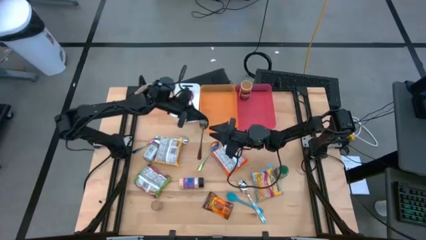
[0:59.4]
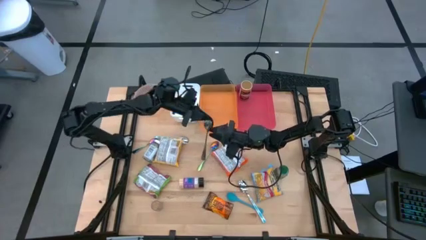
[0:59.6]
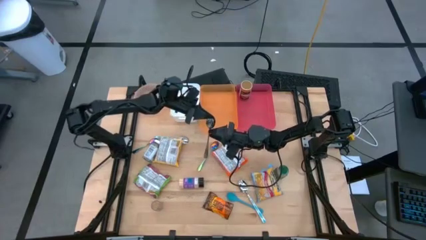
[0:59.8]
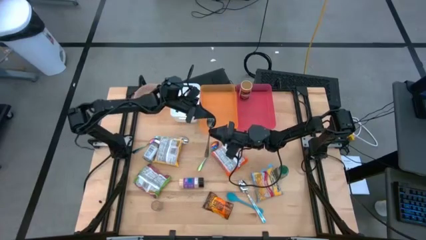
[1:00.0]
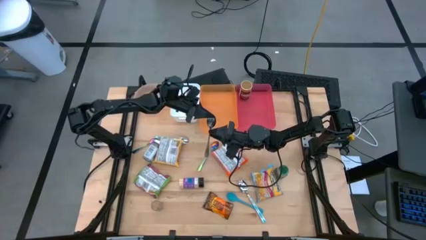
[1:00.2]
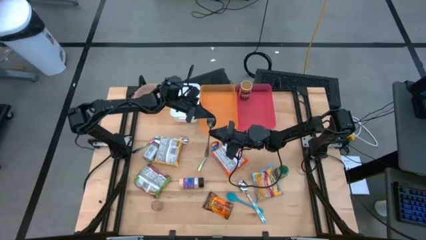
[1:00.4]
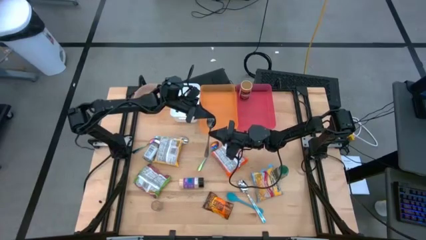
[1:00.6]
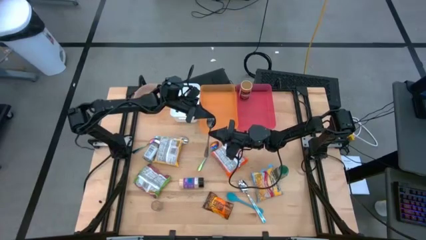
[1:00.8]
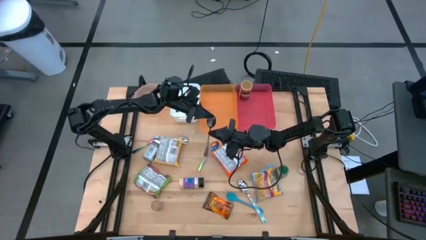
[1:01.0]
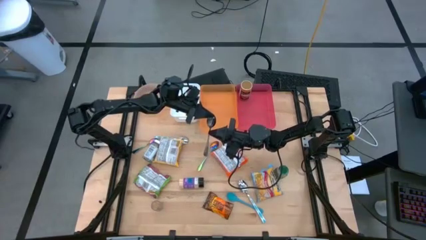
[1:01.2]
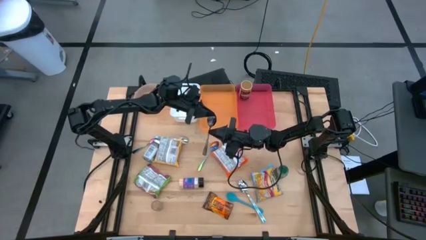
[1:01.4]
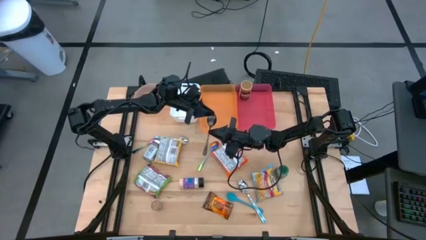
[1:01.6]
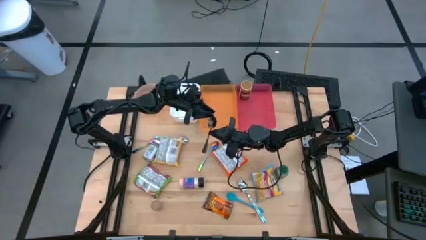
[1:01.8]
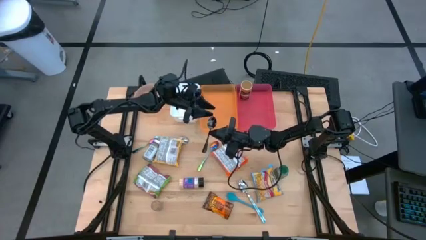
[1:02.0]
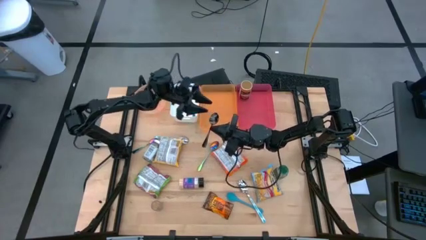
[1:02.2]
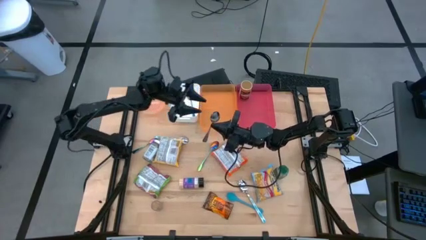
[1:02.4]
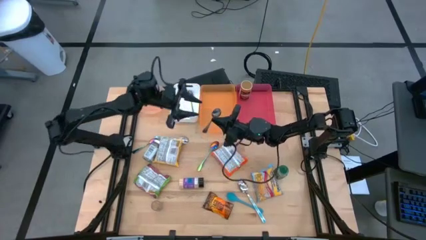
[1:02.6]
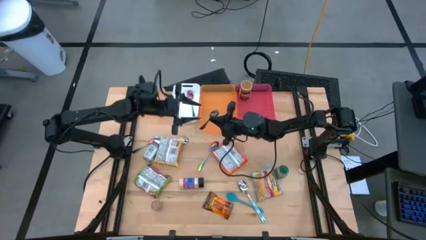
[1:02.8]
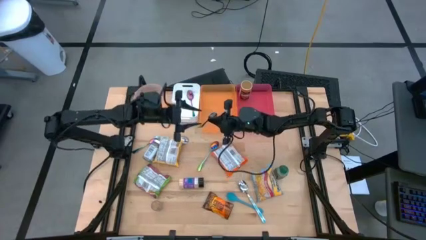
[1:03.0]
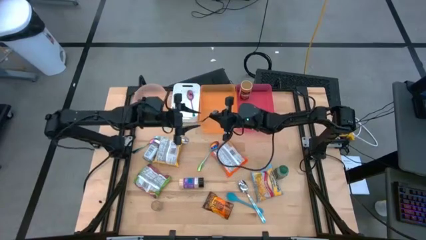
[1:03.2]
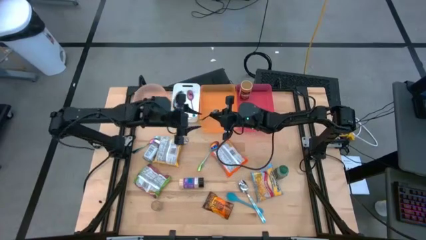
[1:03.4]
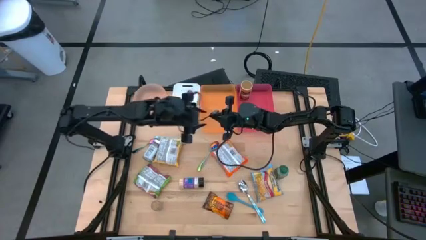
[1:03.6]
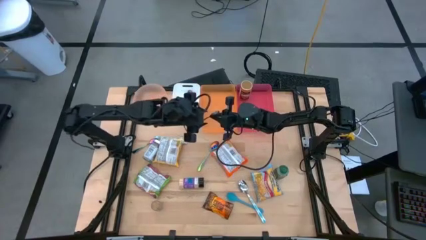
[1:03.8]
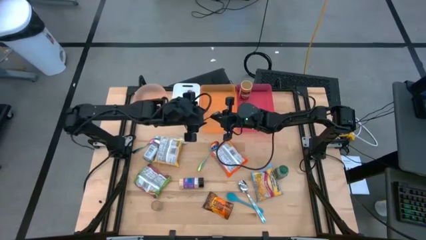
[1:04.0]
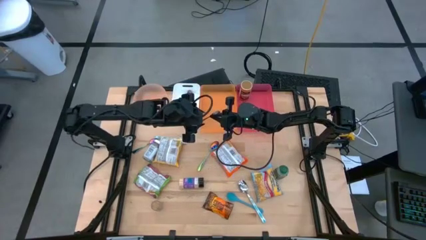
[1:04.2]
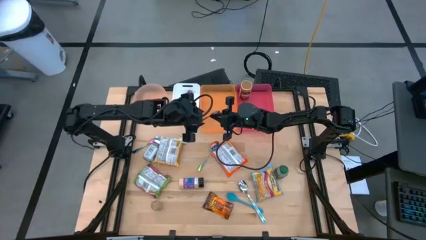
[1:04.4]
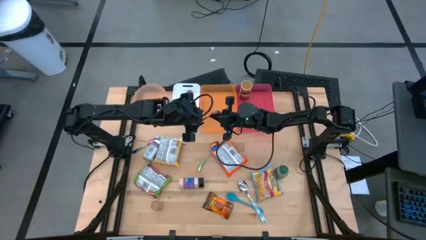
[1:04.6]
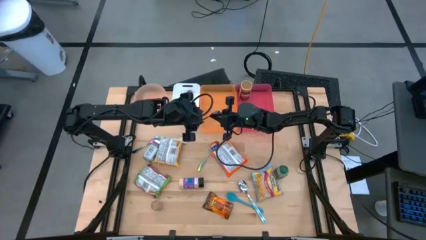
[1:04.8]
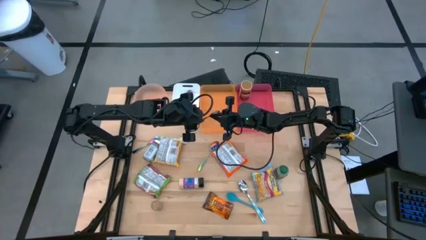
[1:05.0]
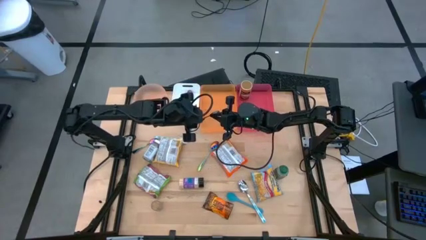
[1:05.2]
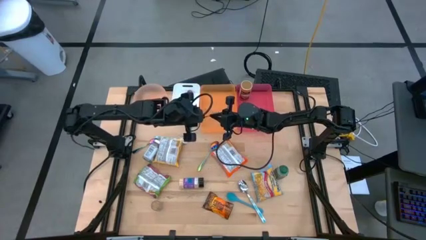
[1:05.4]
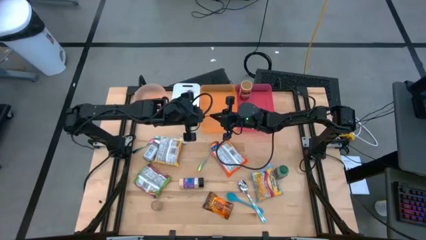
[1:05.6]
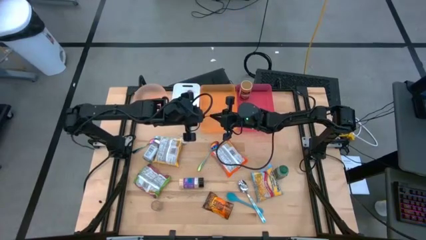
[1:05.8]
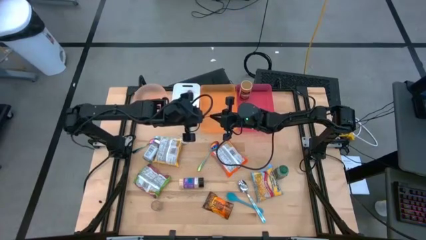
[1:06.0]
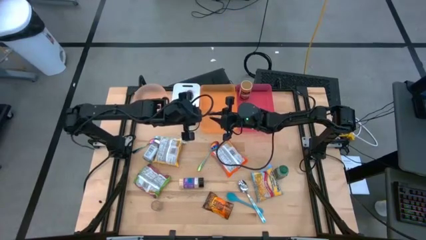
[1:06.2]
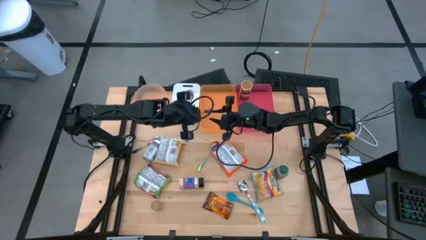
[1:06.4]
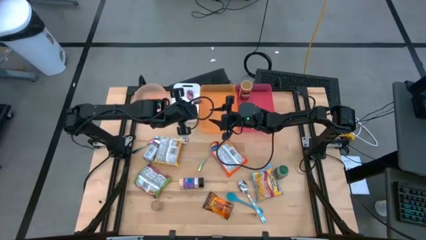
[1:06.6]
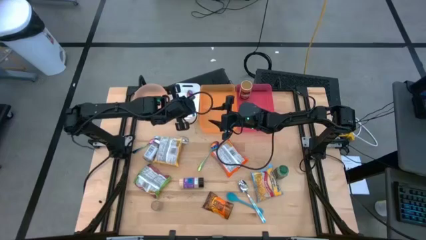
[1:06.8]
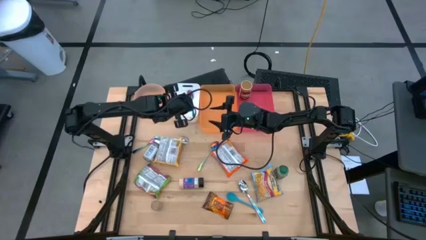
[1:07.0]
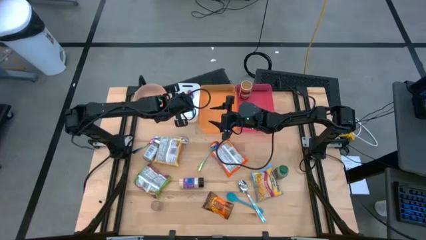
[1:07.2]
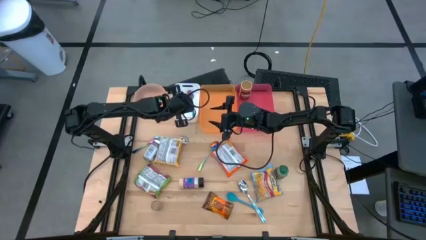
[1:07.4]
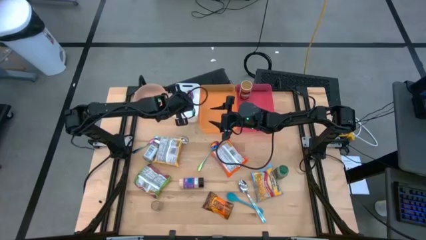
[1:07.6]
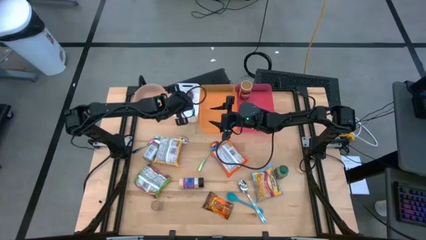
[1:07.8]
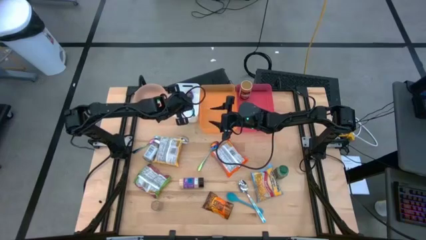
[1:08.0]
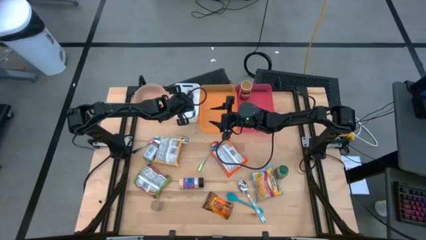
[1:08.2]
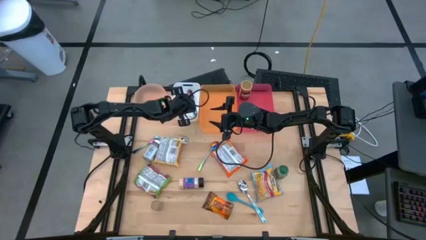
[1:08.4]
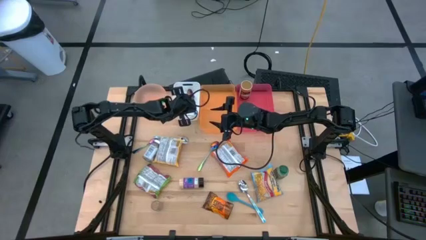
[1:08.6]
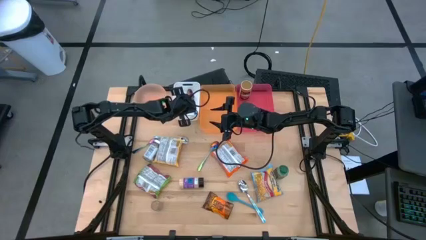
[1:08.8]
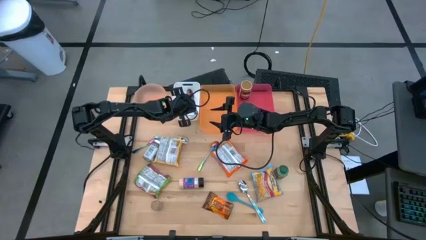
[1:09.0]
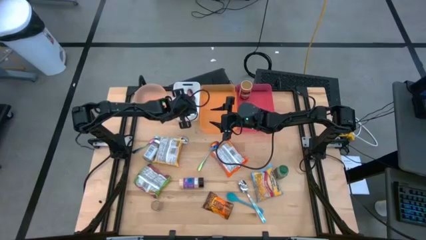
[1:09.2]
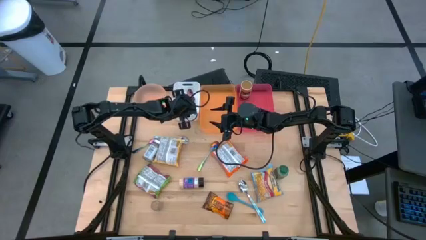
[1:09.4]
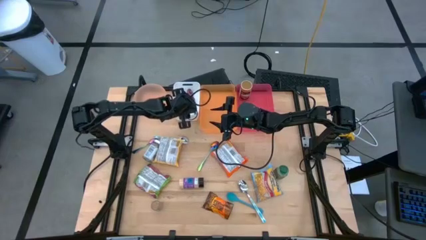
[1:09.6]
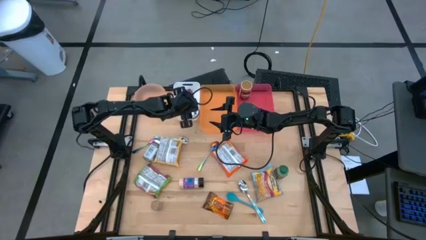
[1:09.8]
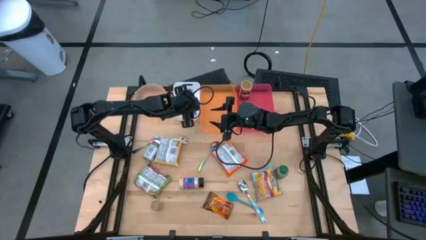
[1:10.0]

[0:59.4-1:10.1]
Task: Pick & Place Food Item
Put the black spoon into the white bin

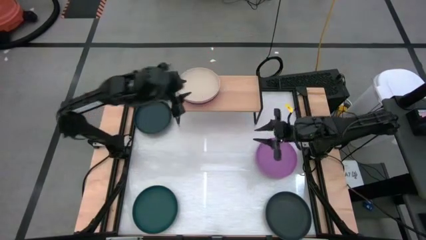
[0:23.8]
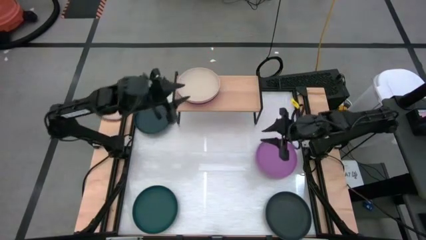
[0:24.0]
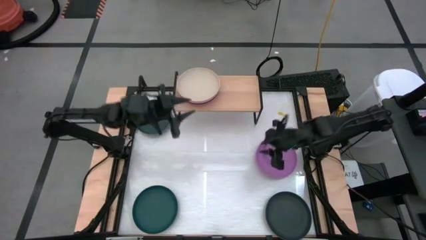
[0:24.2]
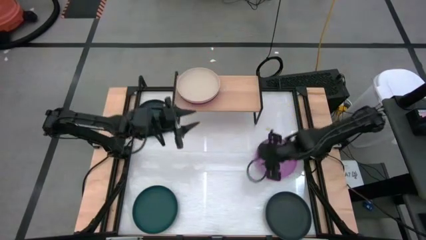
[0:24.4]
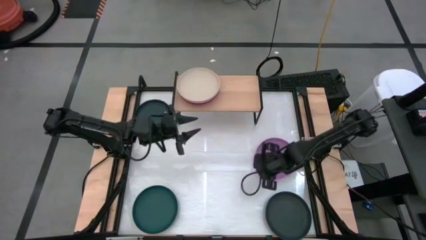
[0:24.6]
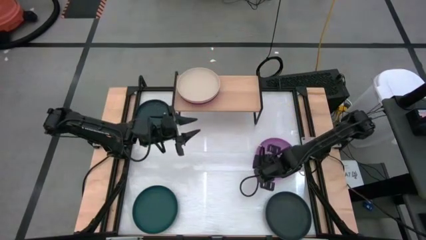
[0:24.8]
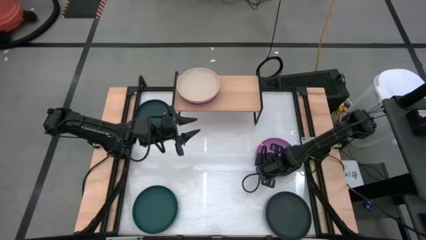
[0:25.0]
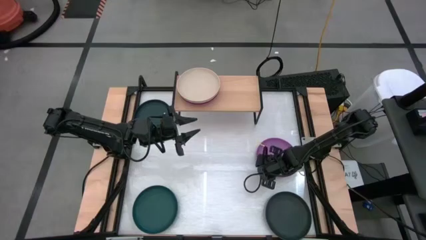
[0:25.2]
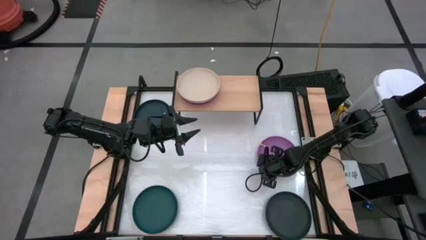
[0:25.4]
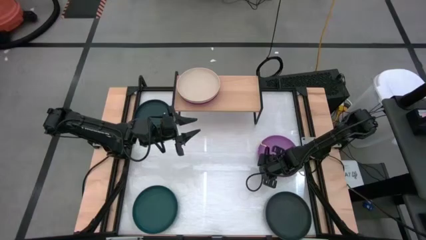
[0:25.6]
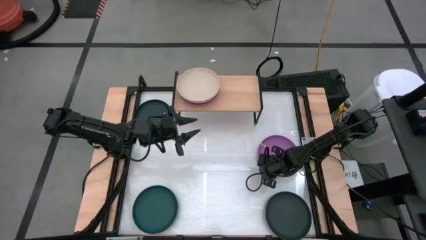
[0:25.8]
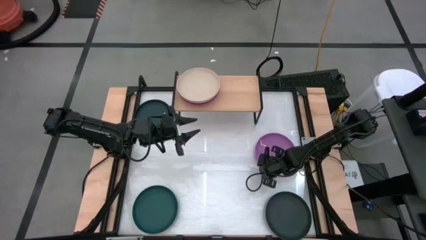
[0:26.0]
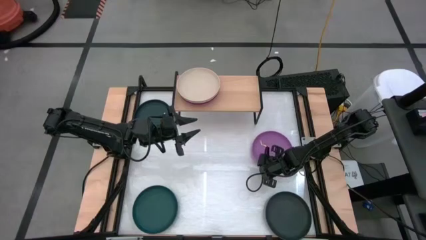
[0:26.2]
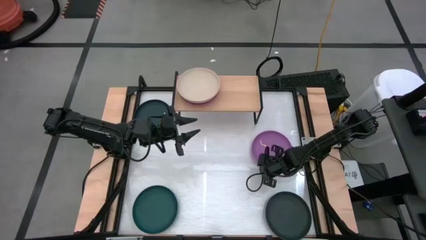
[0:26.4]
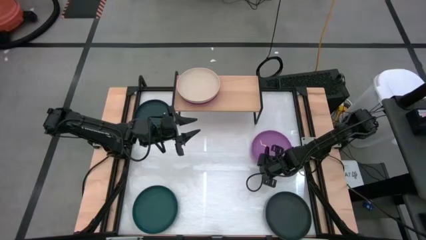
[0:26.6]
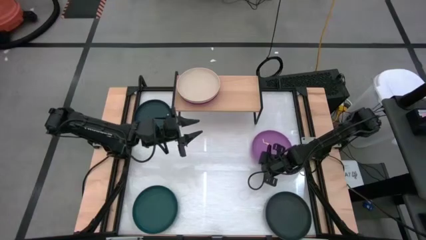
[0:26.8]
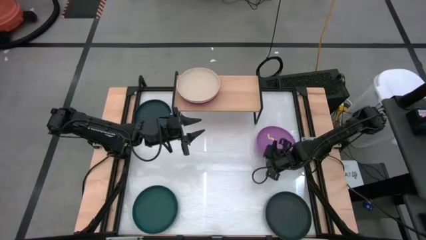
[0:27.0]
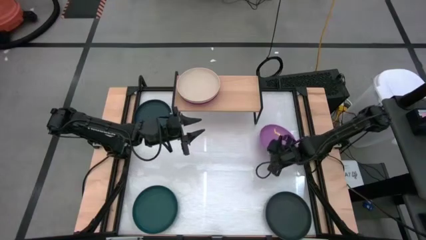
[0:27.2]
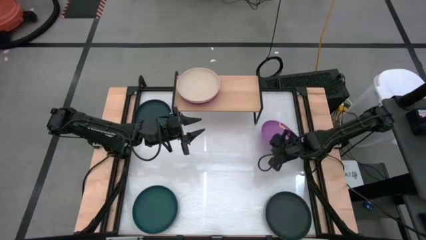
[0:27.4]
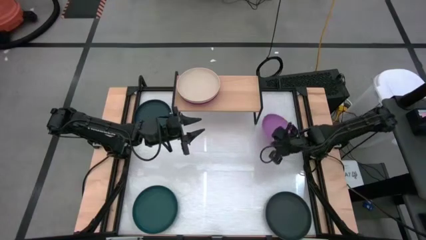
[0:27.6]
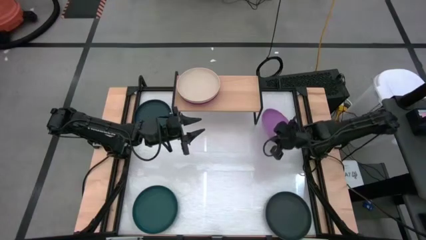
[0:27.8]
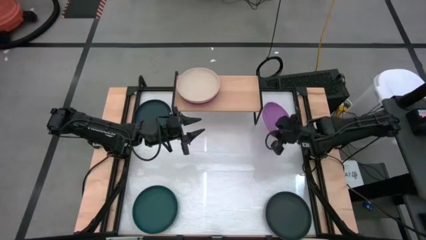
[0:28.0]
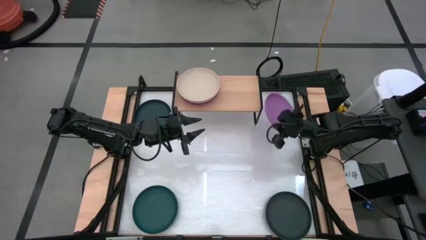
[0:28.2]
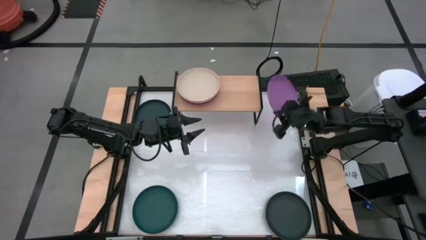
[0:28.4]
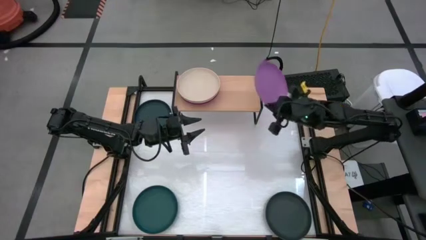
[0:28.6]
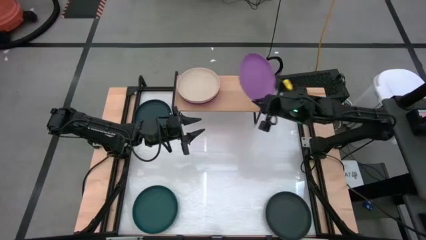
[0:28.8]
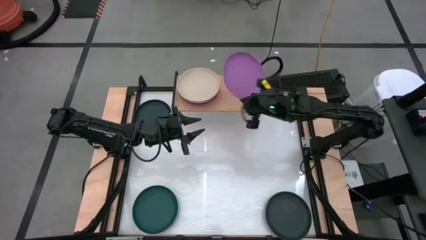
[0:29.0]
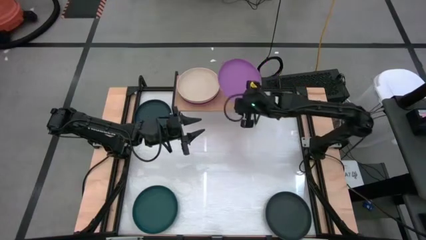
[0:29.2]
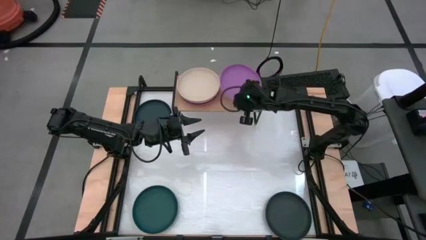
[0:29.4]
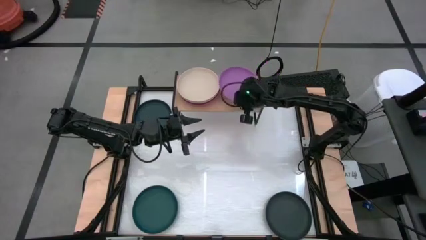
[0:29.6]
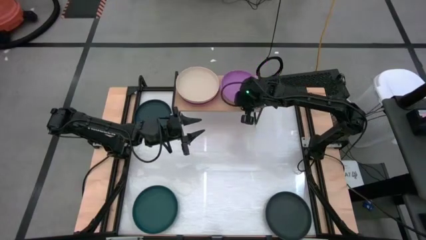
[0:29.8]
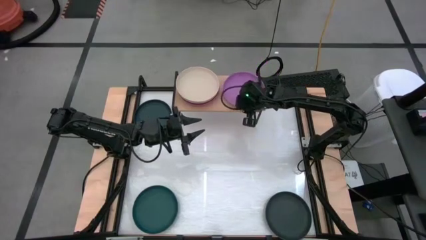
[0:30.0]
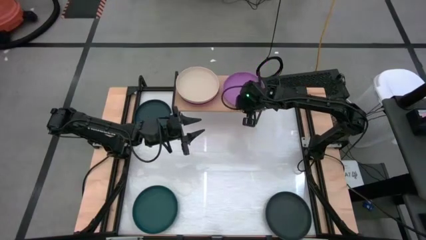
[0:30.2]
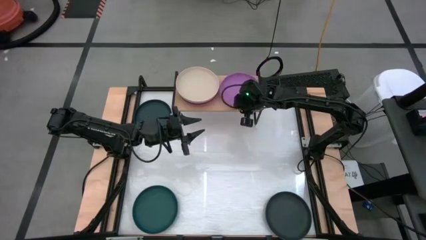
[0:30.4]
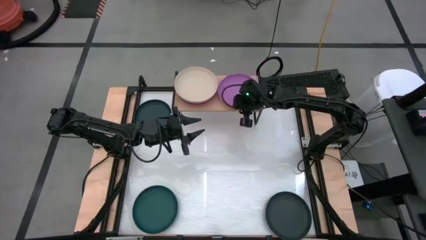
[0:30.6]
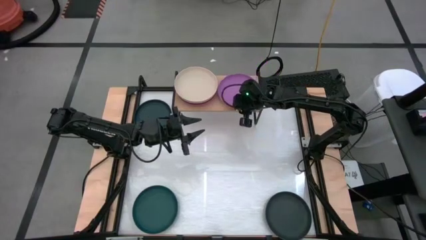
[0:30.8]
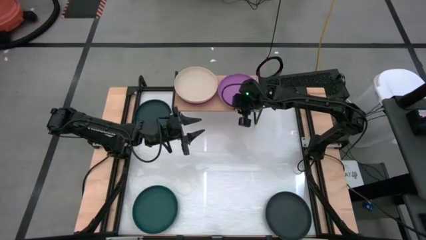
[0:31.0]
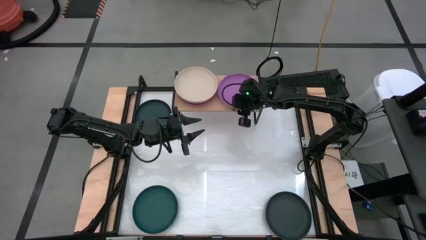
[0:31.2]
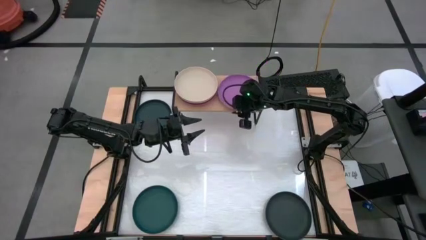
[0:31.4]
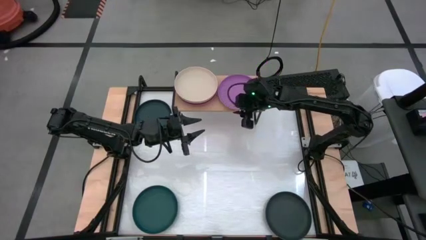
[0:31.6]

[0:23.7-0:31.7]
Task: Place and stack plates onto a shelf
Put the violet plate on the shelf
